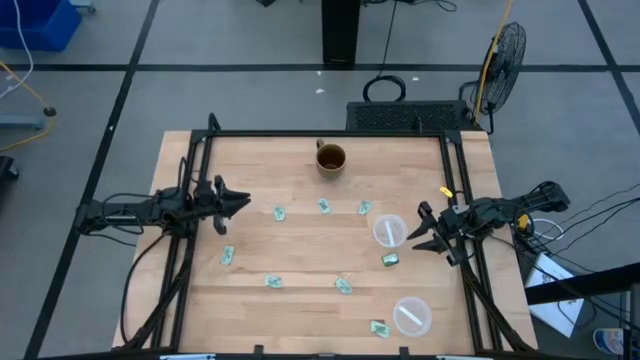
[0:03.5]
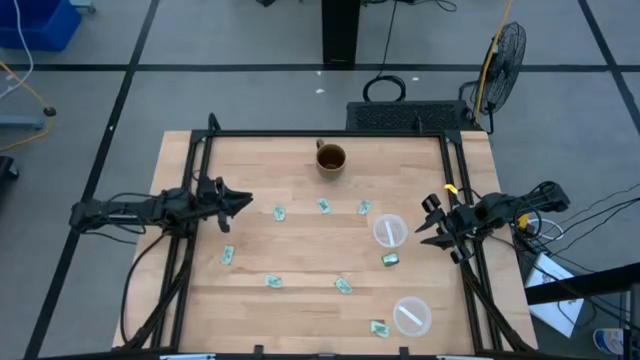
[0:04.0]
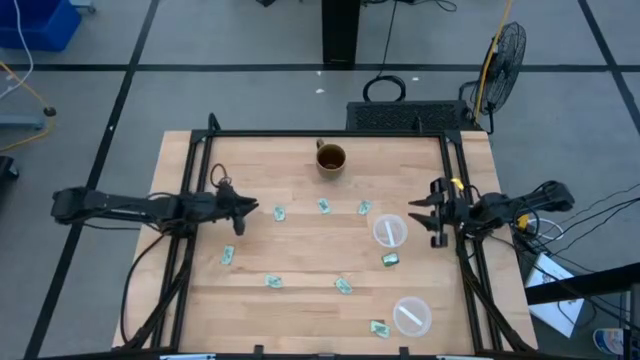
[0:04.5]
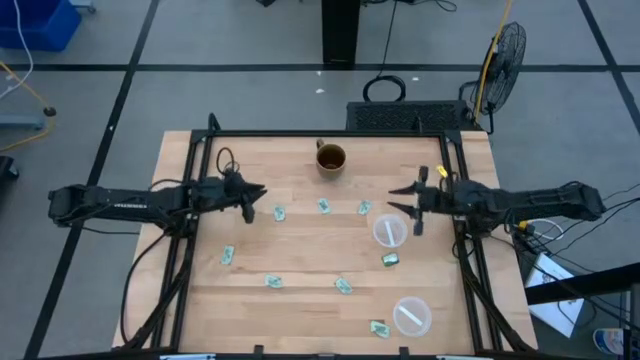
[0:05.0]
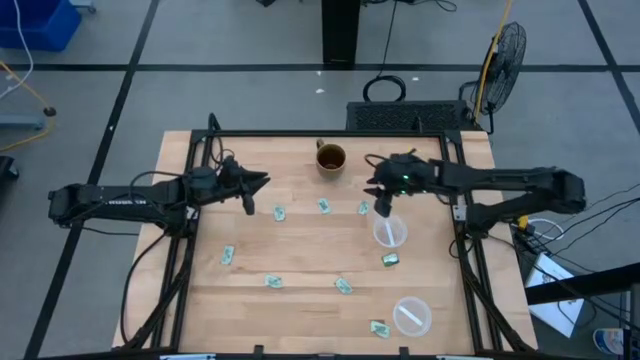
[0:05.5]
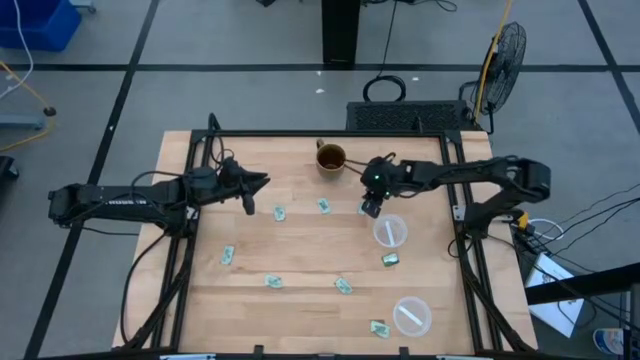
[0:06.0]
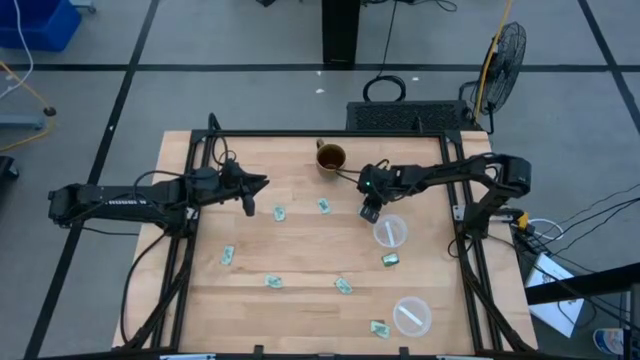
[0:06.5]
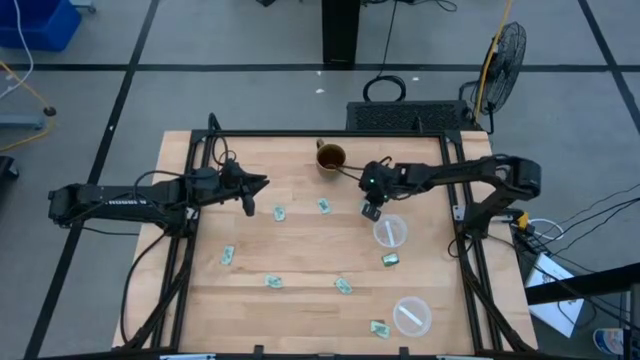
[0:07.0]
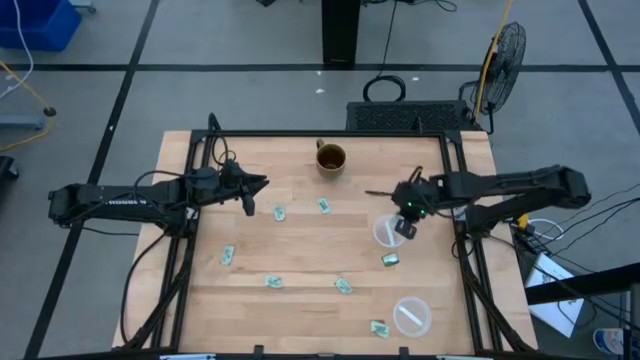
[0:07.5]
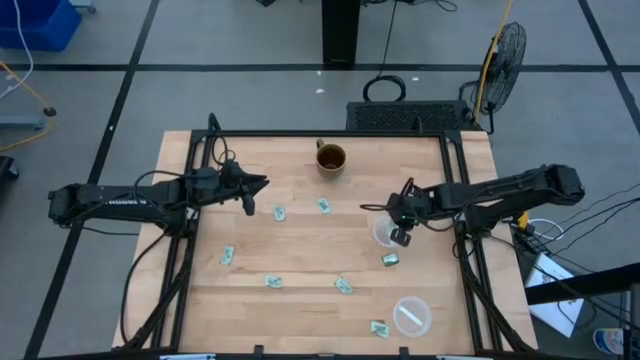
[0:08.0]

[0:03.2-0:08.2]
Task: Pick and place items into bin
Put the stevia packet into the top transparent bin

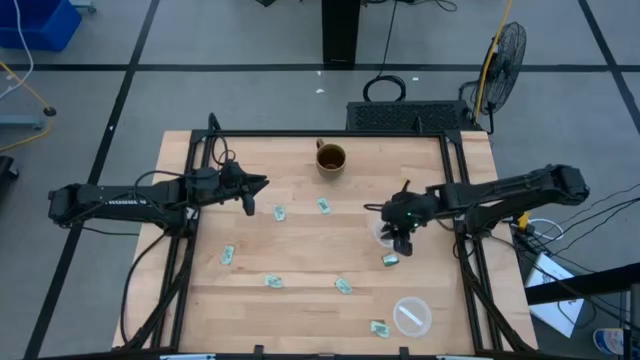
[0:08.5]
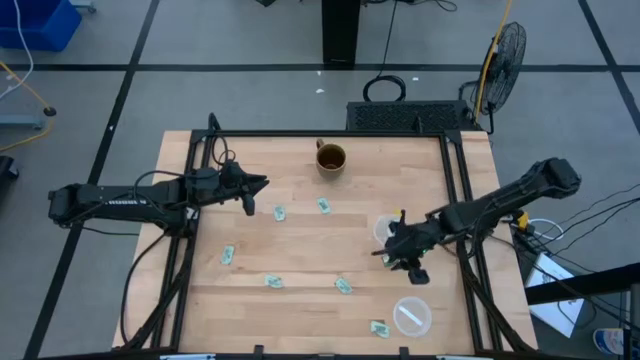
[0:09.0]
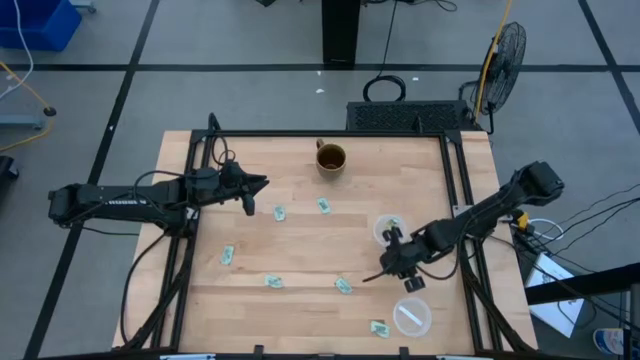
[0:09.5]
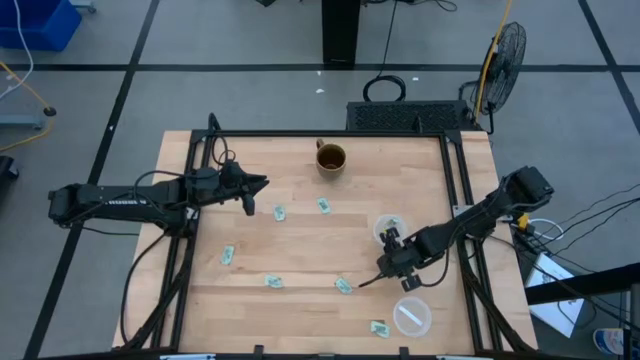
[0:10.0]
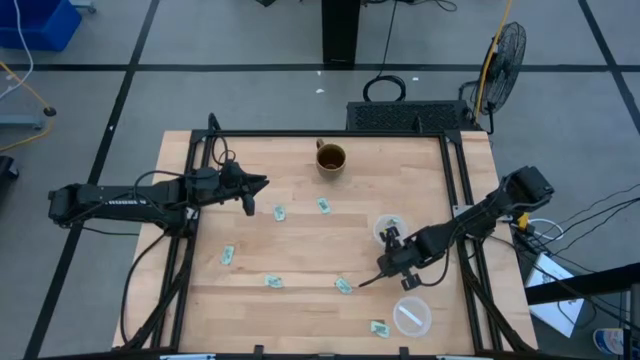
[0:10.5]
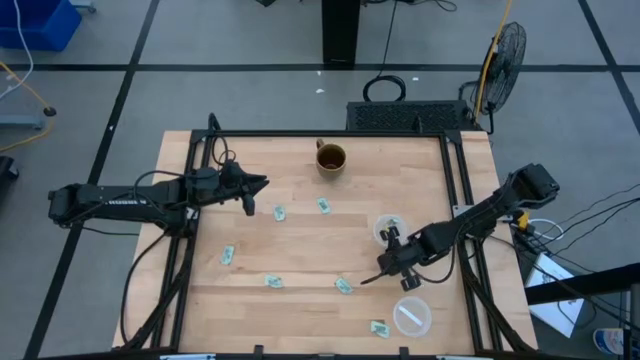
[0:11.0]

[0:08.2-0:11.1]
Put the truvia packet into the bottom transparent bin

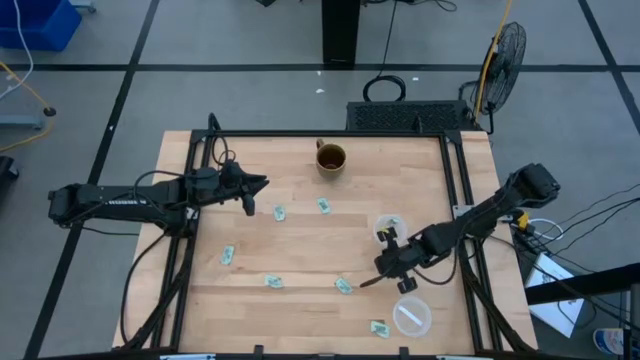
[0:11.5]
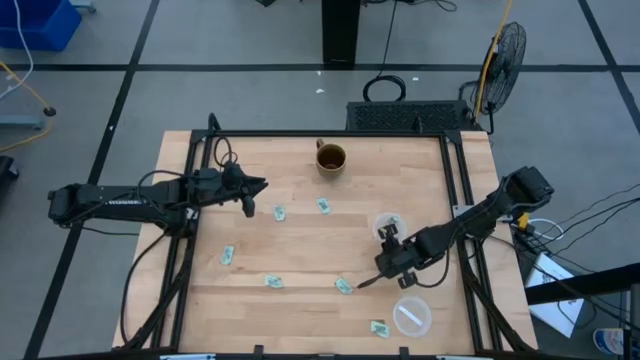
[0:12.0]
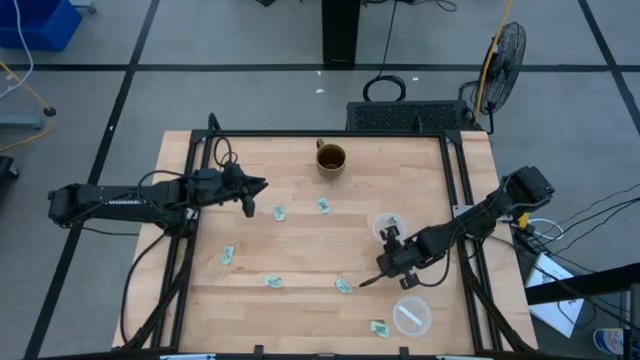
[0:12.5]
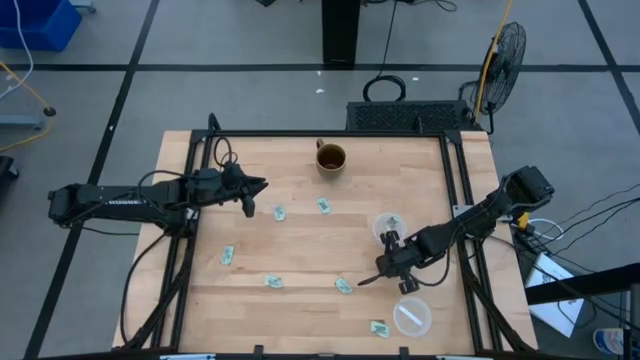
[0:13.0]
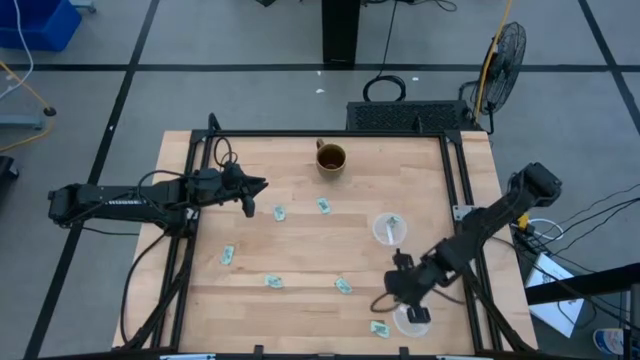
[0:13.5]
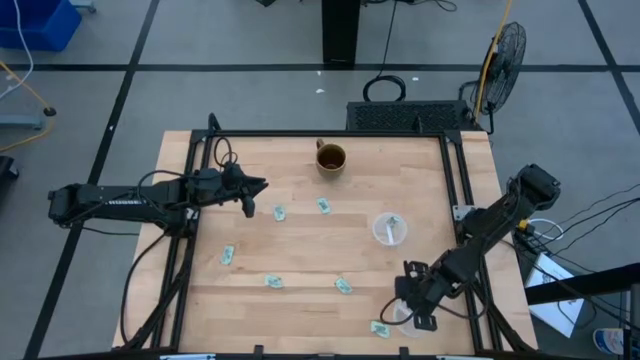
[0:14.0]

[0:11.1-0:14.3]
Put the truvia packet into the bottom transparent bin

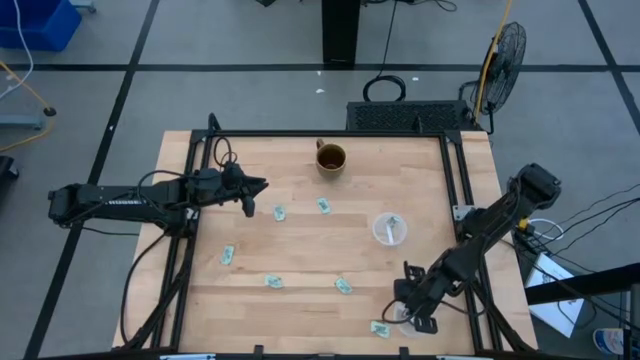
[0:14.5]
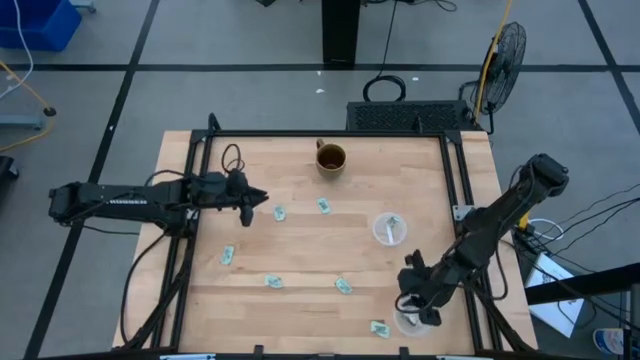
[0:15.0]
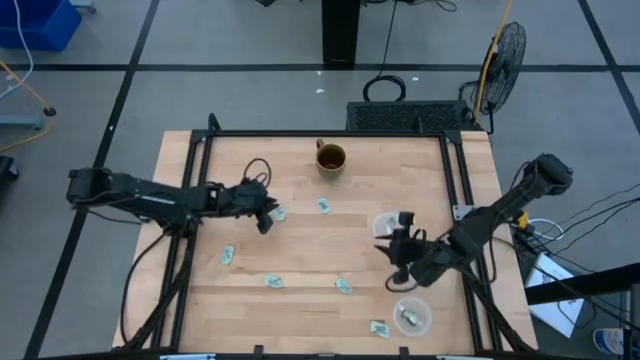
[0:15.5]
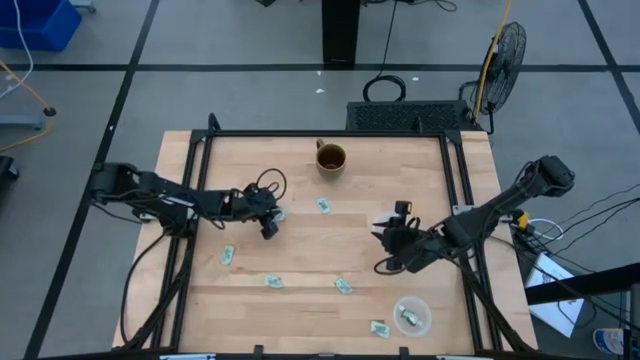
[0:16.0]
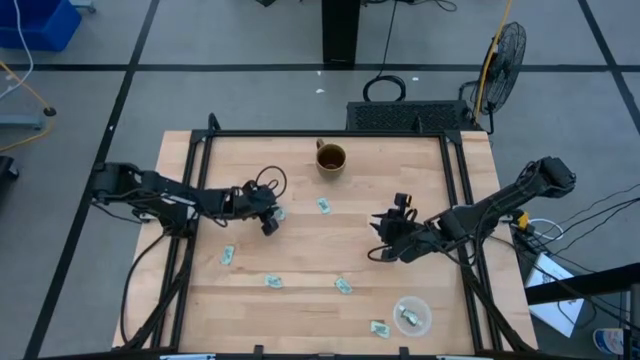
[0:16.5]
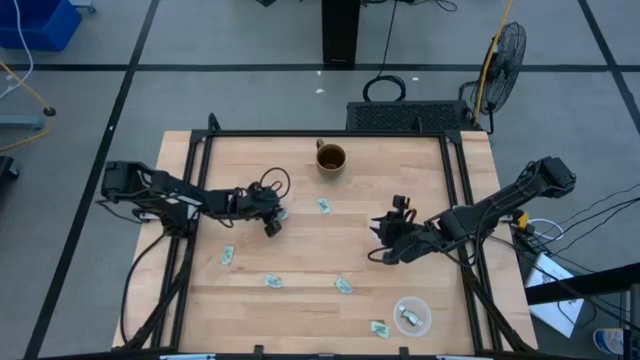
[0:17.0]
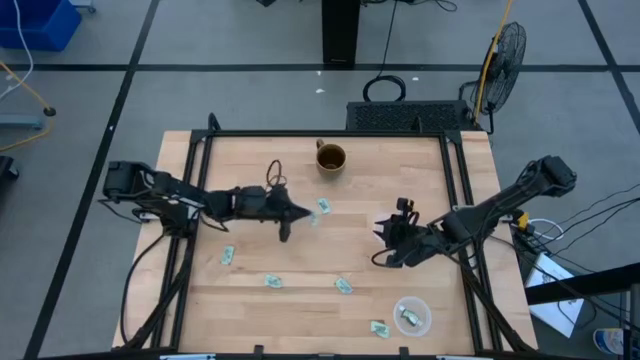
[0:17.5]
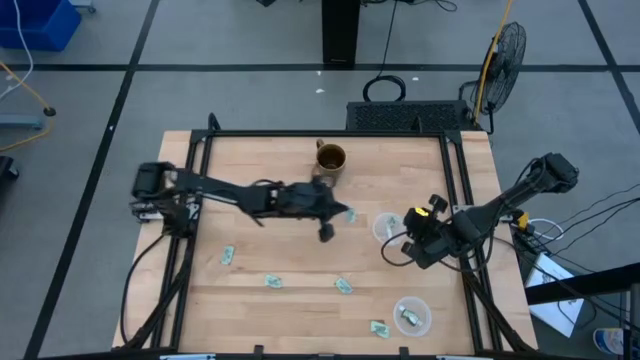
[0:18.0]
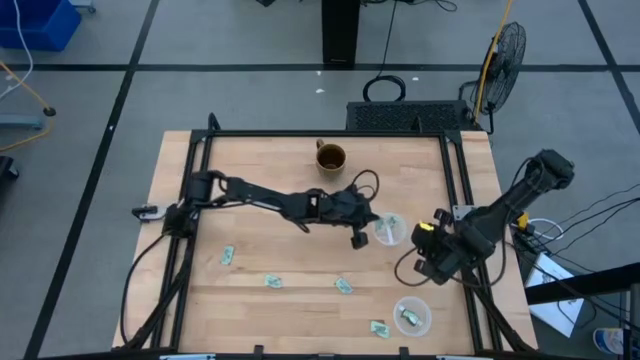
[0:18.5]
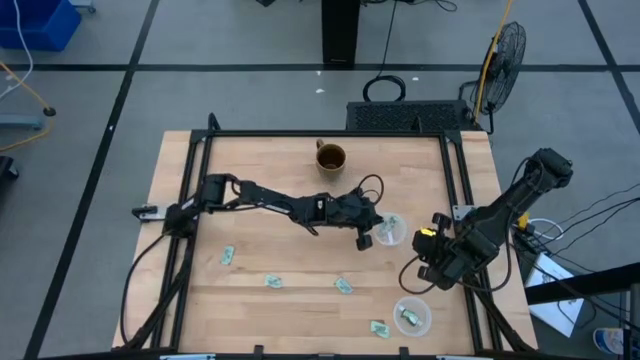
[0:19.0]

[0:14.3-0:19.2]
Put the stevia packet into the top transparent bin

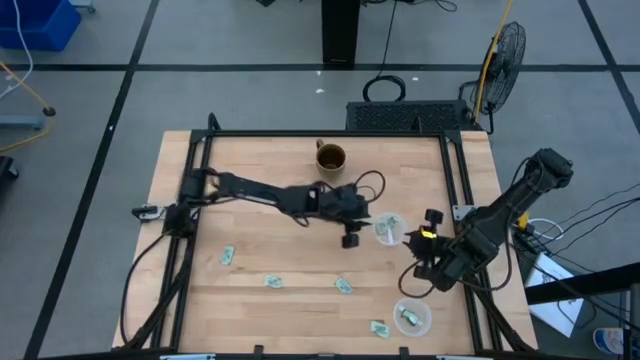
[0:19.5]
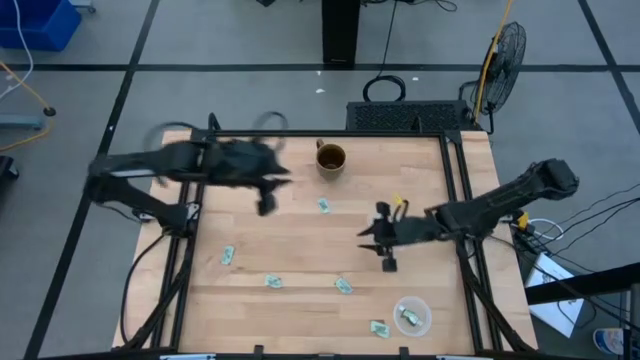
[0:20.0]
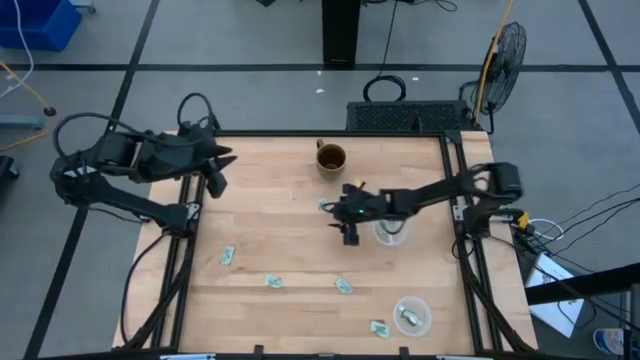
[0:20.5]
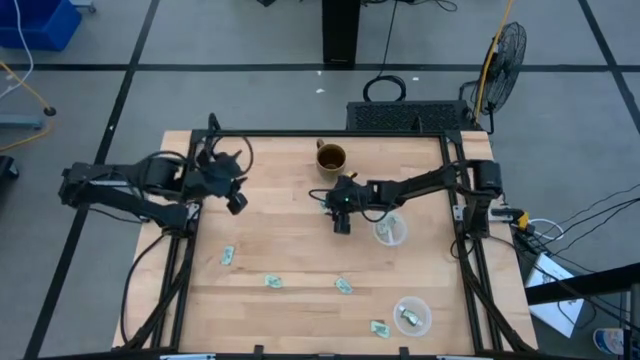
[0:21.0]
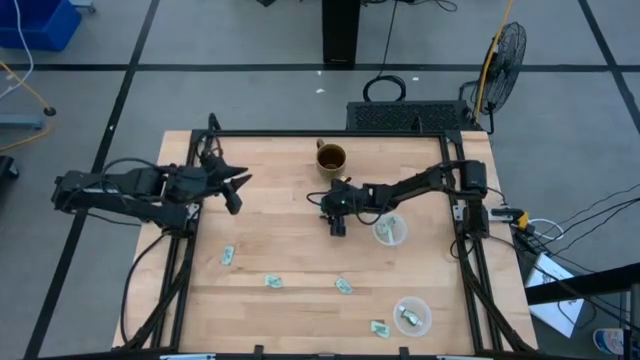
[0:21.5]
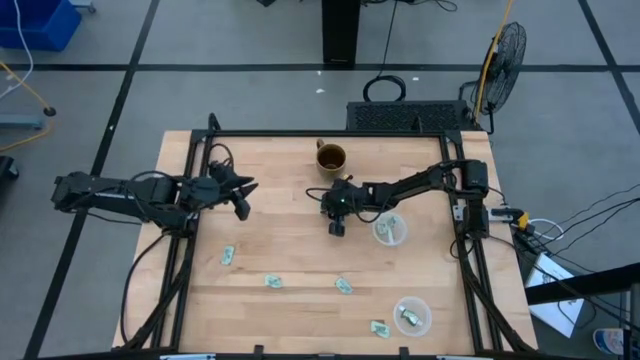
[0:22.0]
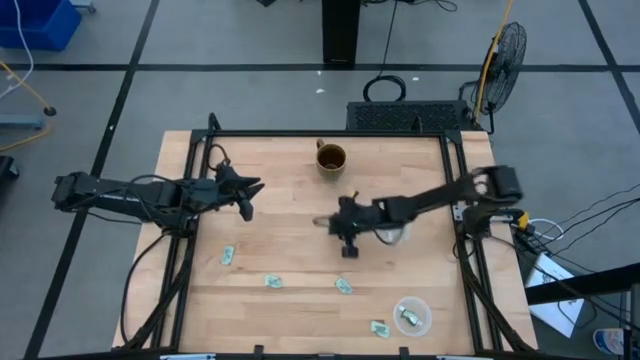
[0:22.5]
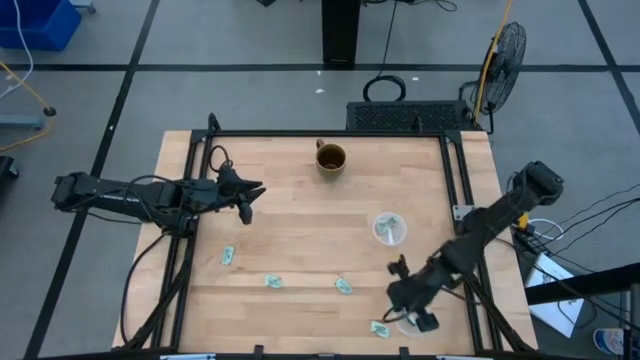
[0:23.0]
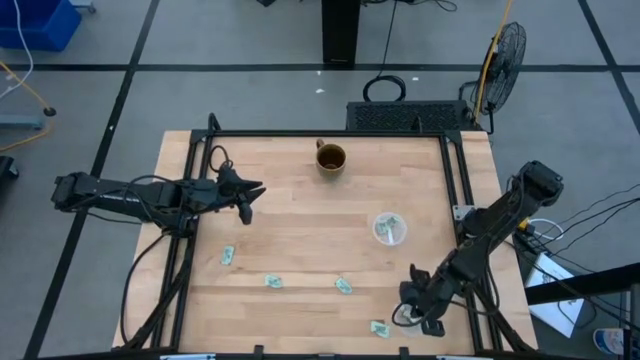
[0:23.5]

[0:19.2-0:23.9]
Put the stevia packet into the bottom transparent bin
